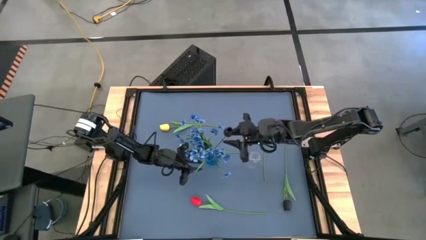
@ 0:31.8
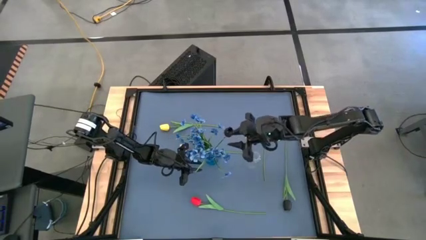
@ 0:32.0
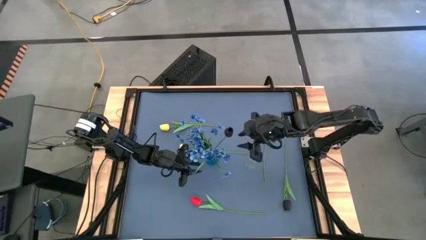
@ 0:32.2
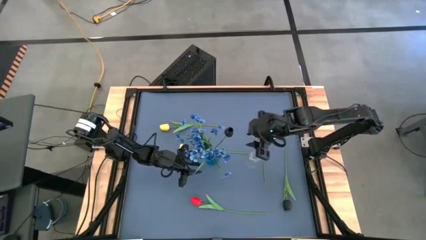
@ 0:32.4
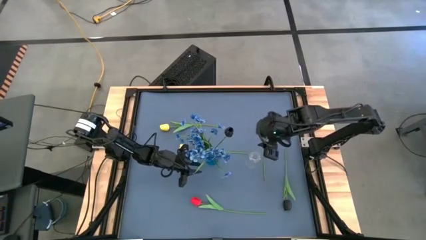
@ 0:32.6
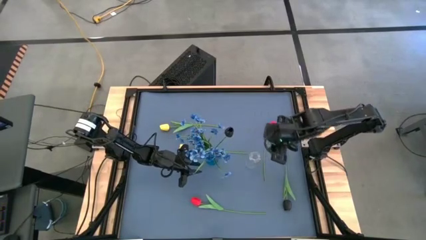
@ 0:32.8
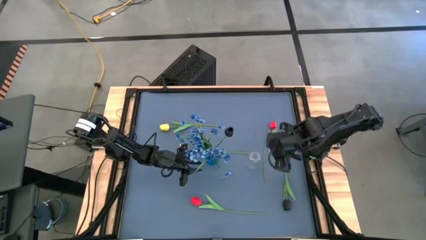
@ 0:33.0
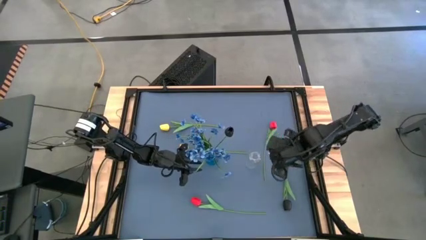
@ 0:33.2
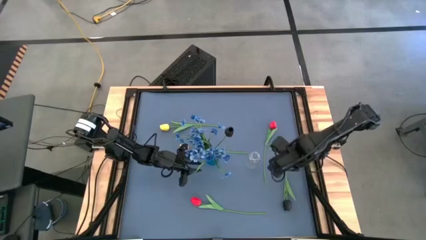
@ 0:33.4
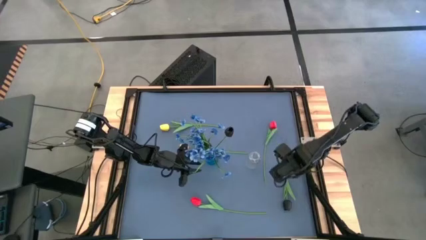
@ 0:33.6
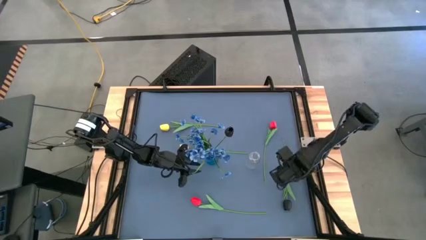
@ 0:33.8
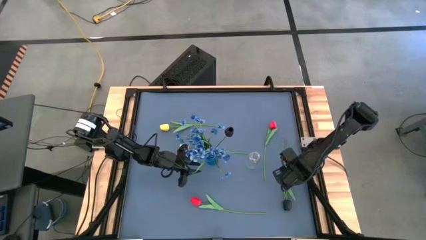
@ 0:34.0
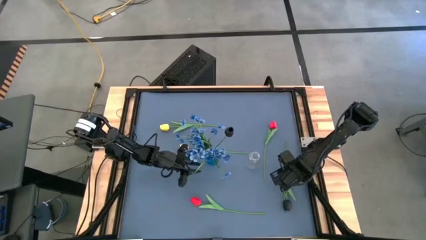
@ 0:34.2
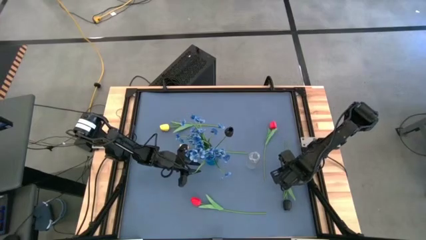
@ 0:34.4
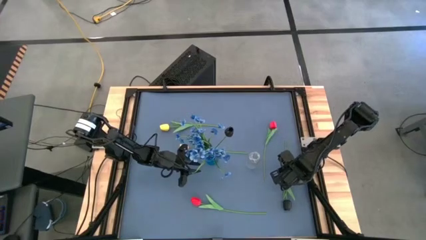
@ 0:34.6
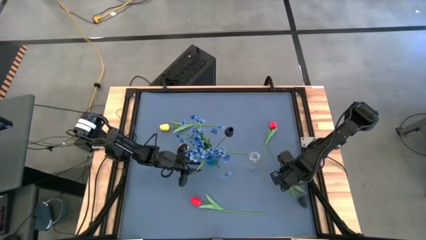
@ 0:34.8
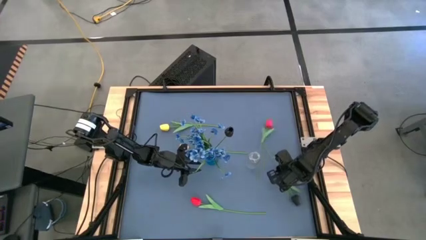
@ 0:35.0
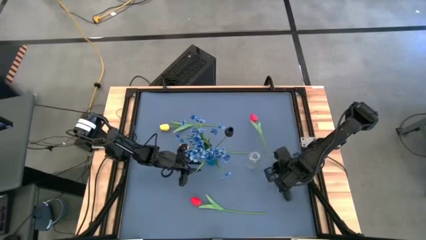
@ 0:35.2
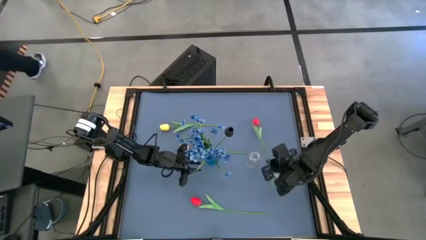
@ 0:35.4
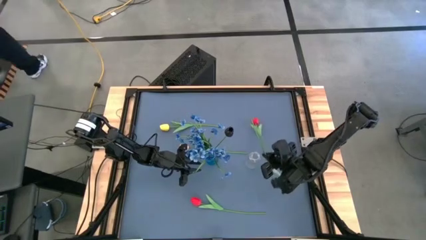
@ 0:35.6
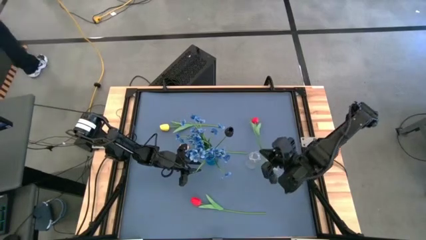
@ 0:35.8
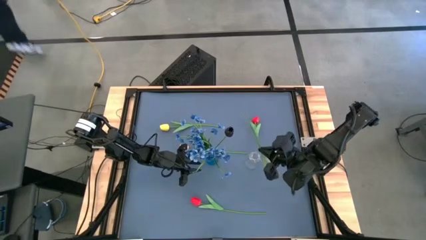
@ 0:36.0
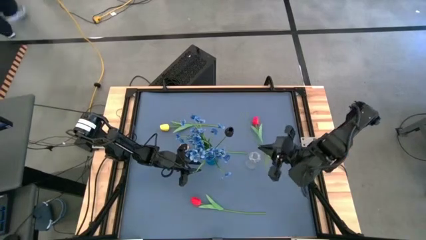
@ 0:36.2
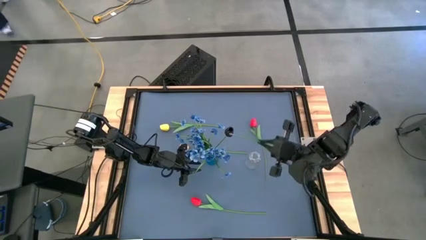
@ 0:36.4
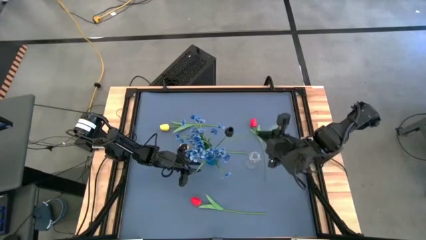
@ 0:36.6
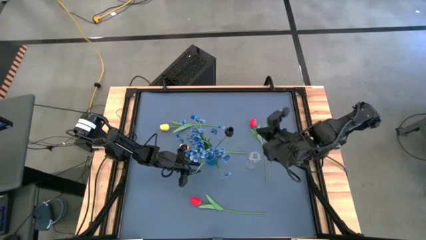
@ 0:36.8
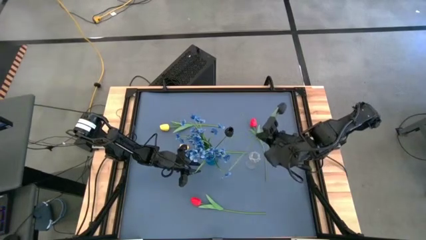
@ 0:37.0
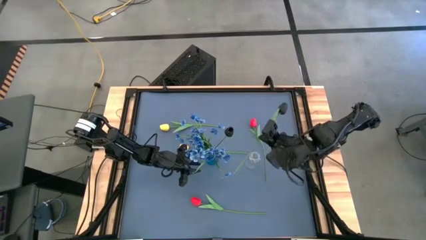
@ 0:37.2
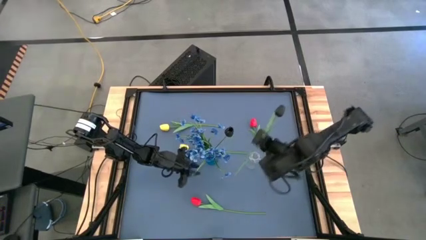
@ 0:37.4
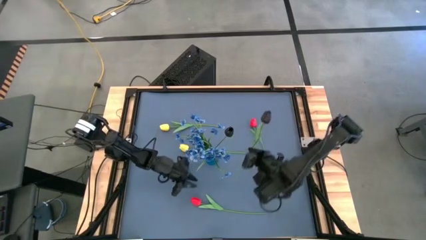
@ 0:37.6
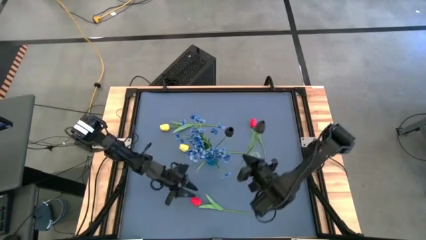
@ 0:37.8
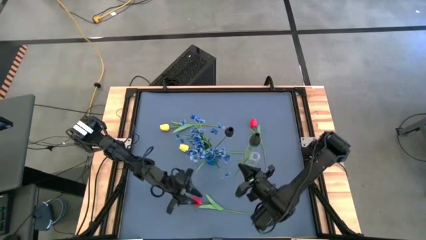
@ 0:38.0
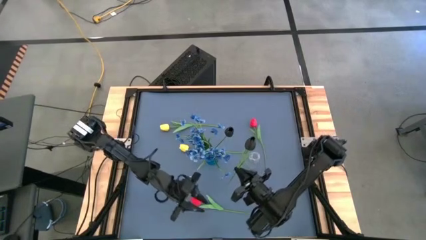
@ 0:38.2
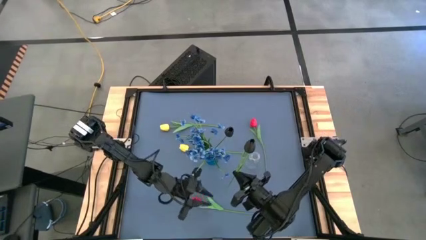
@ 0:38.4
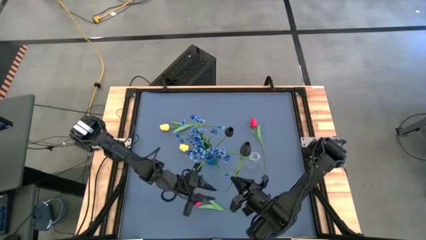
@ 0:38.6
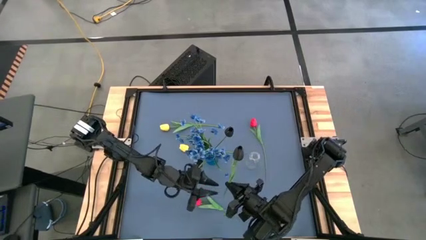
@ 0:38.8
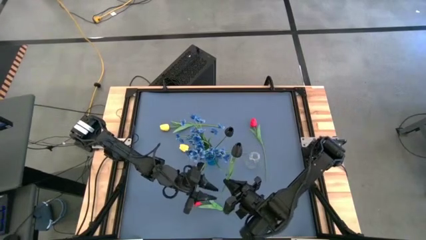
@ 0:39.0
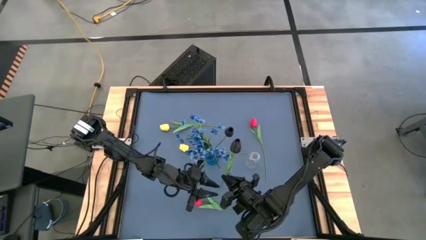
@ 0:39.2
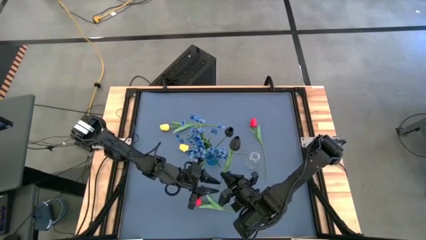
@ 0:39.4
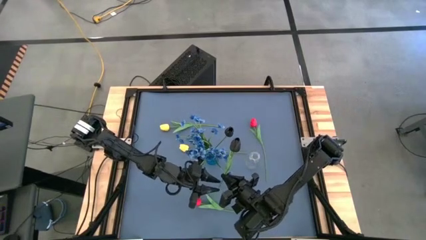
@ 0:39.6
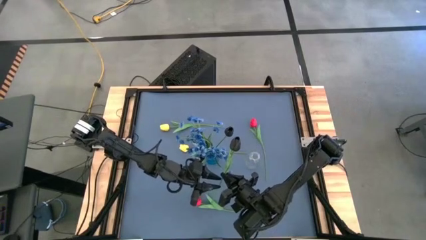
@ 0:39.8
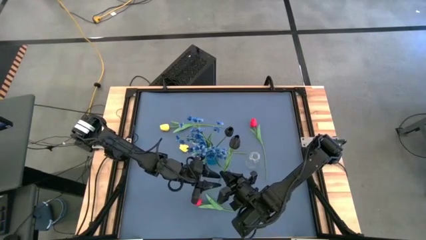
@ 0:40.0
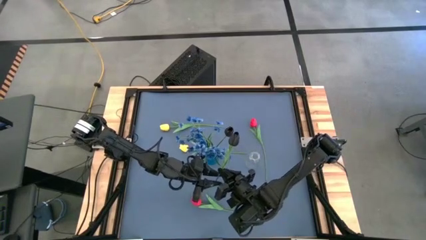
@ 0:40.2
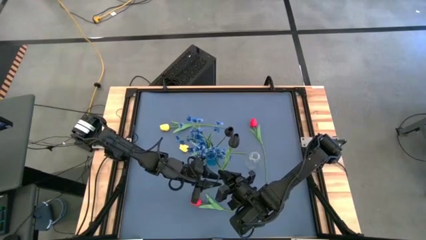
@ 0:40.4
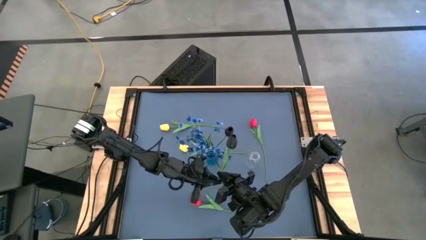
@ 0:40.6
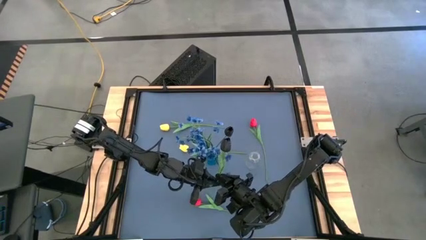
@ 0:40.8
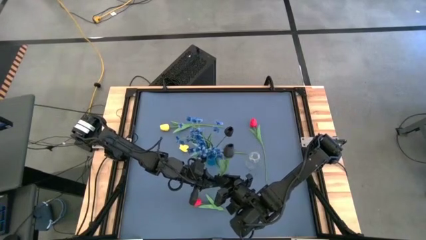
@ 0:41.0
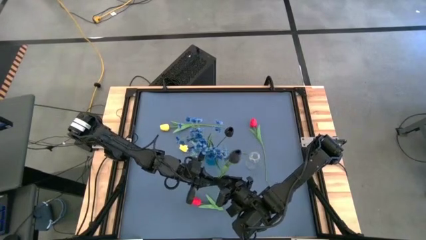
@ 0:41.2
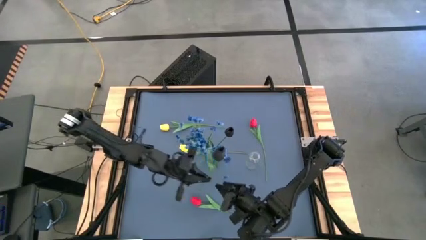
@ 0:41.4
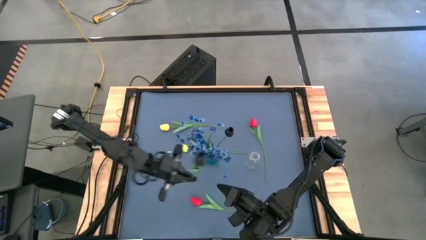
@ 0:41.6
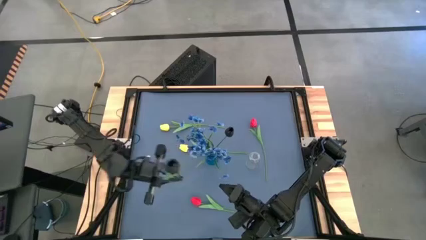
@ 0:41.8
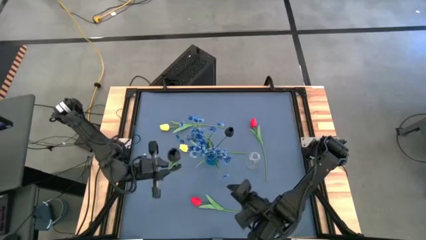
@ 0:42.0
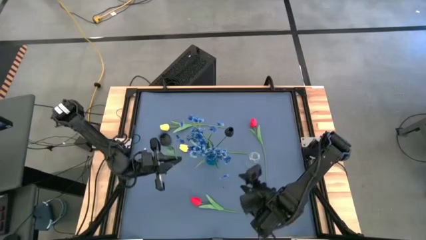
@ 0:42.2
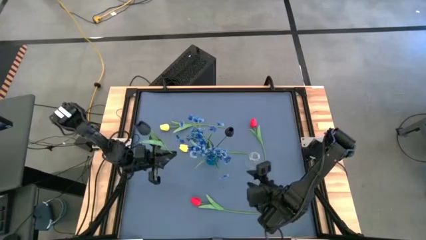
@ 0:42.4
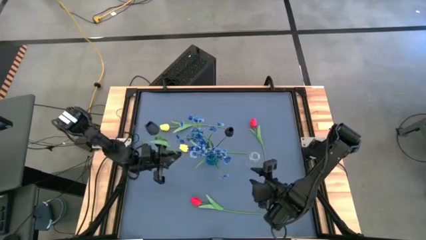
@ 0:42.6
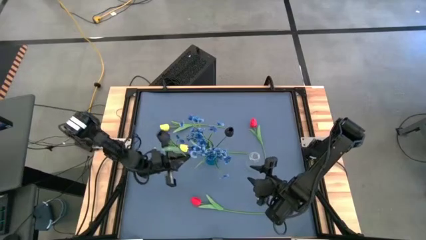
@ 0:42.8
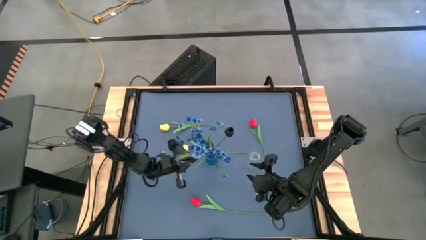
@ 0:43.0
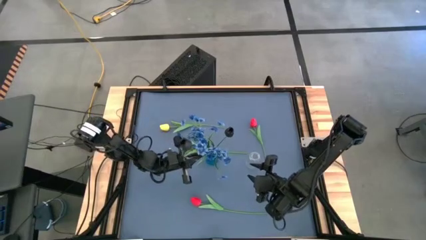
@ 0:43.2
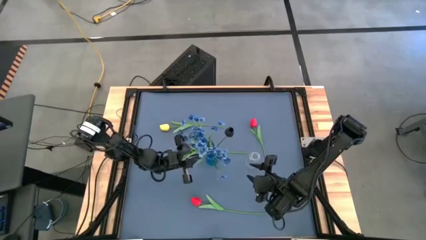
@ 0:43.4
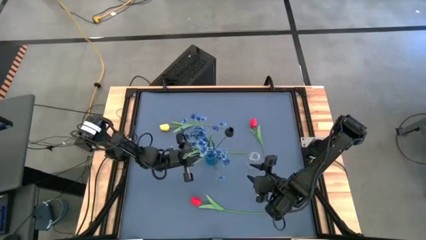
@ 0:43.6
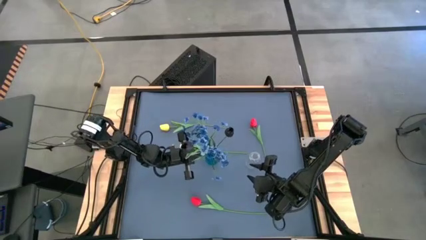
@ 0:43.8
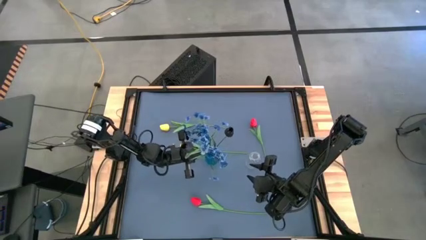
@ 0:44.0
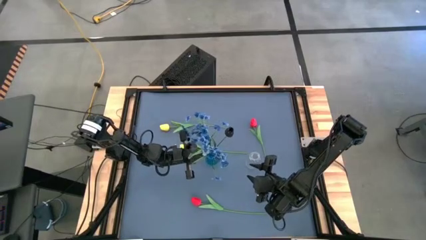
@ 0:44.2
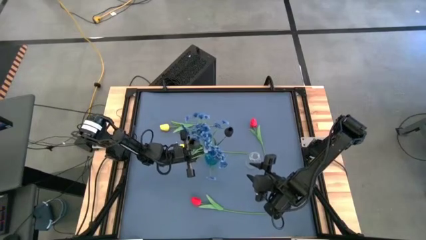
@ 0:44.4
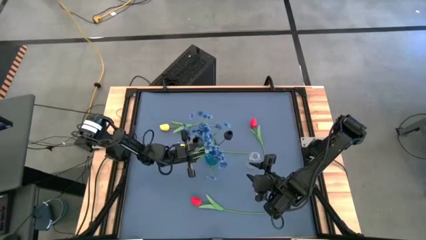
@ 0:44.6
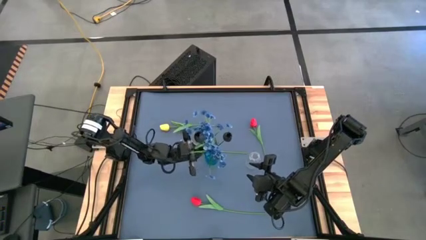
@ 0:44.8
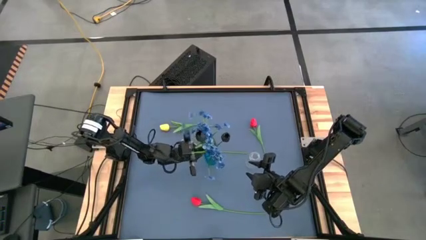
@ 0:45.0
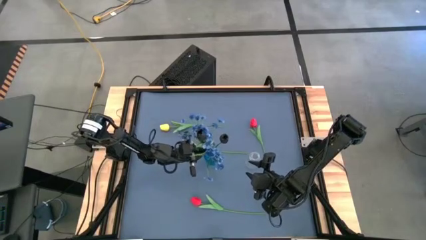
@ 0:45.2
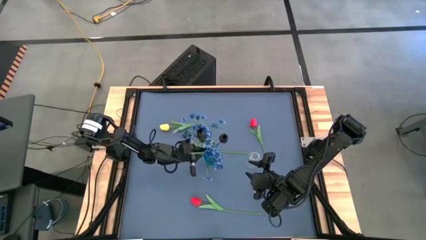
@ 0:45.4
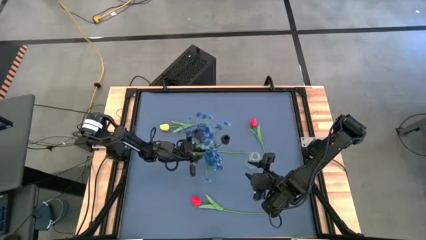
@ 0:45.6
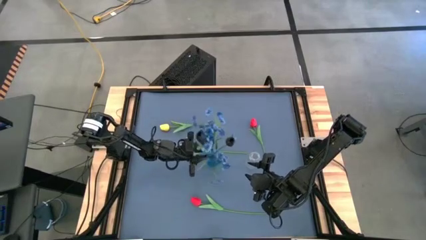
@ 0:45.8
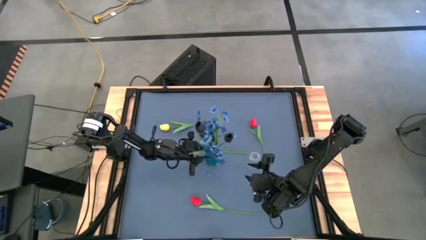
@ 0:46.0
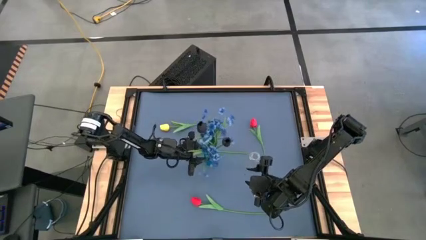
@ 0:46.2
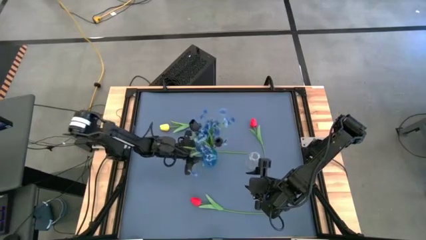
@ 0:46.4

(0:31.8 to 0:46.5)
Task: Sort flowers into vase by color
Put the black flower into the blue vase
